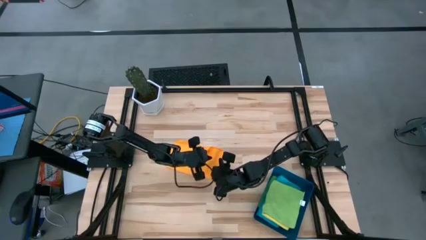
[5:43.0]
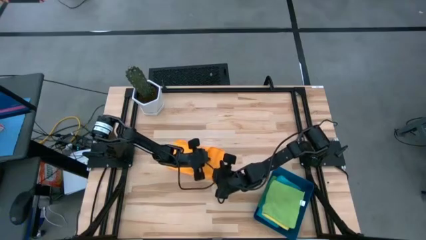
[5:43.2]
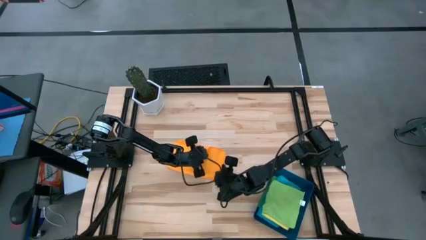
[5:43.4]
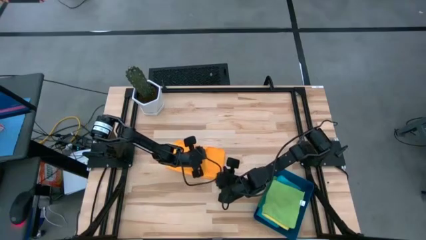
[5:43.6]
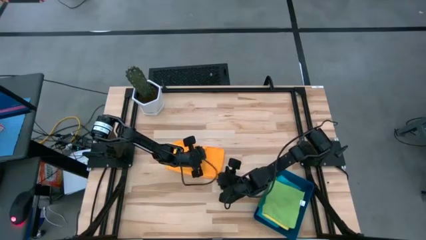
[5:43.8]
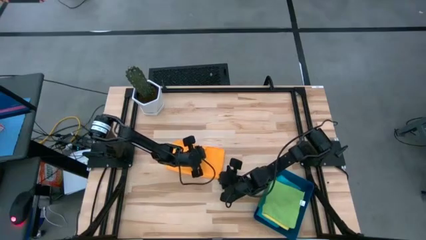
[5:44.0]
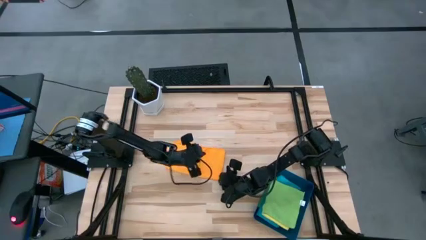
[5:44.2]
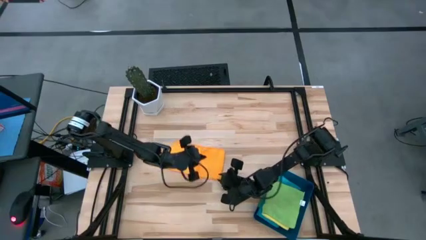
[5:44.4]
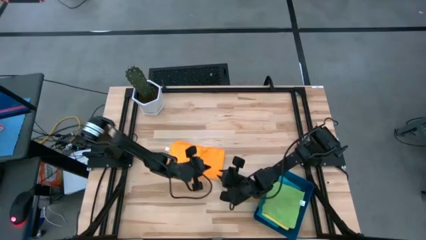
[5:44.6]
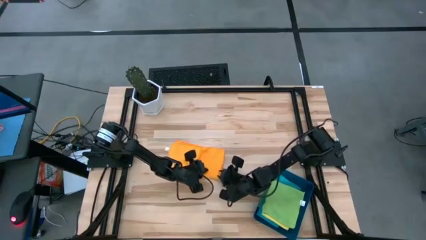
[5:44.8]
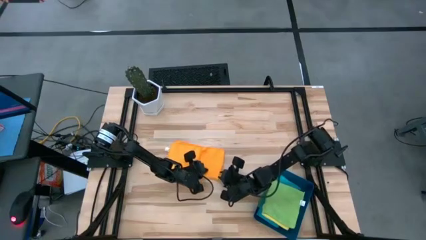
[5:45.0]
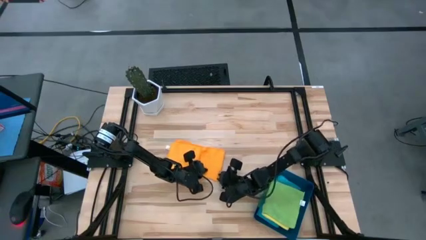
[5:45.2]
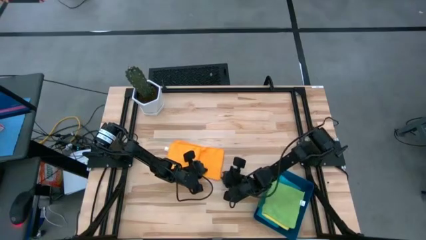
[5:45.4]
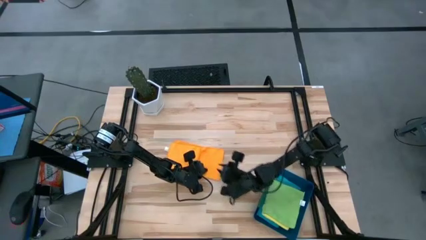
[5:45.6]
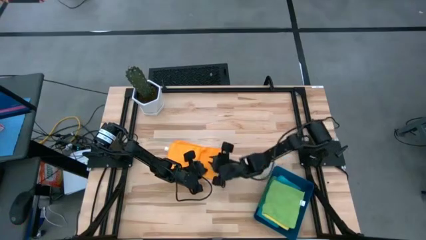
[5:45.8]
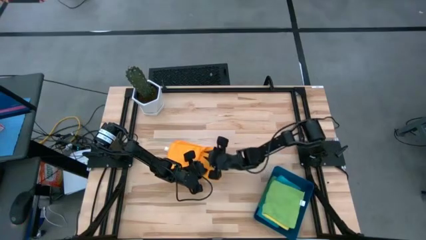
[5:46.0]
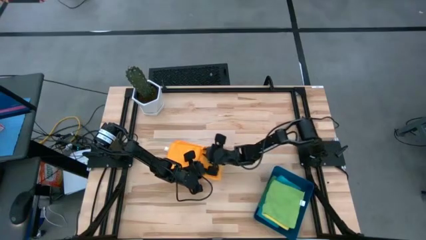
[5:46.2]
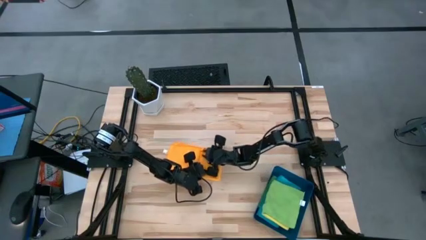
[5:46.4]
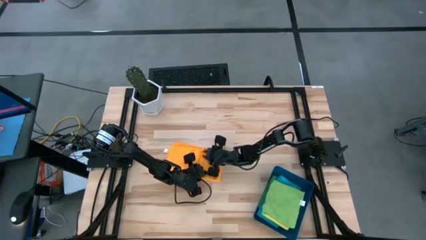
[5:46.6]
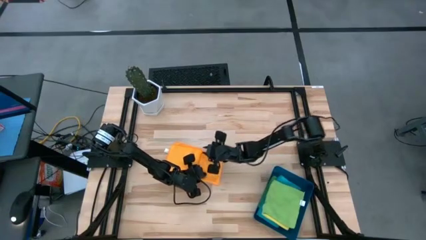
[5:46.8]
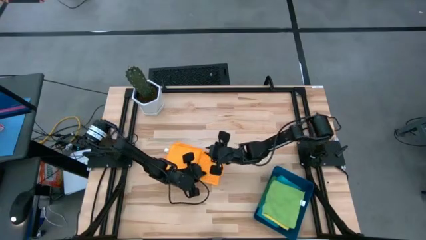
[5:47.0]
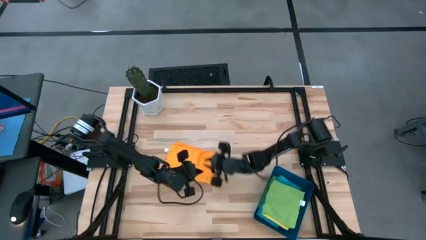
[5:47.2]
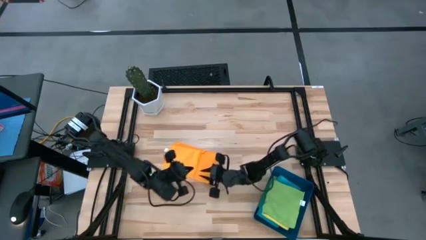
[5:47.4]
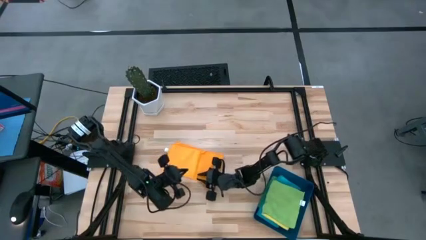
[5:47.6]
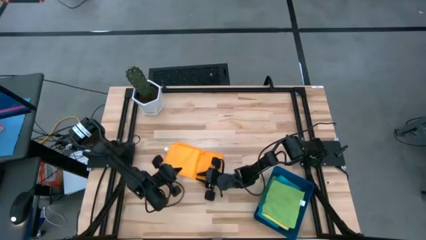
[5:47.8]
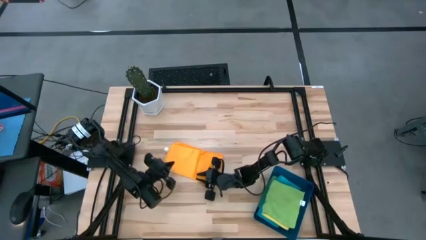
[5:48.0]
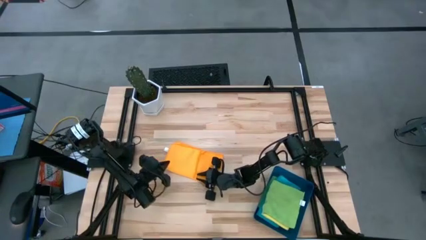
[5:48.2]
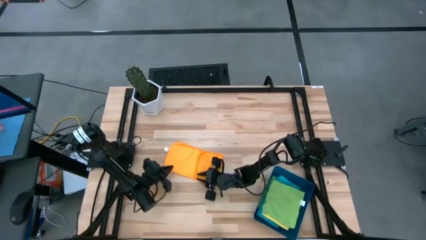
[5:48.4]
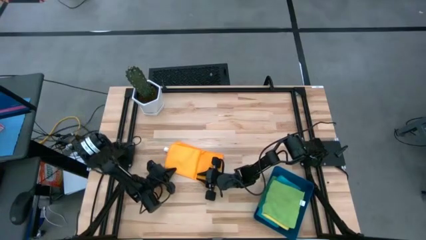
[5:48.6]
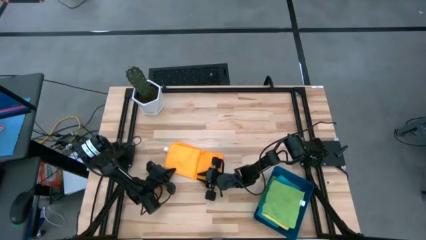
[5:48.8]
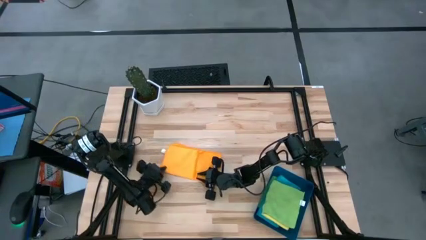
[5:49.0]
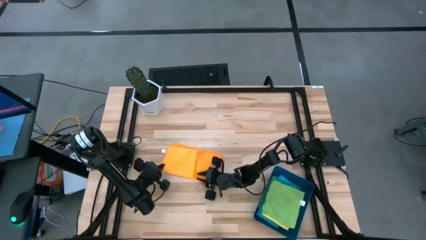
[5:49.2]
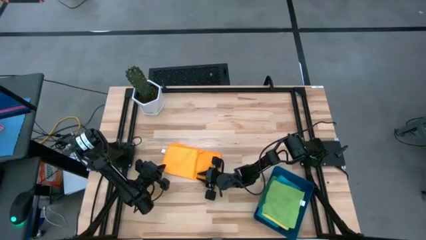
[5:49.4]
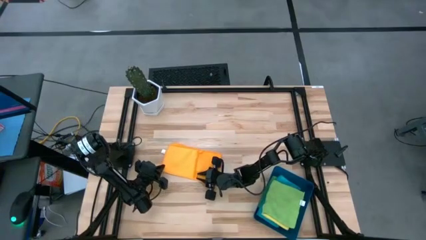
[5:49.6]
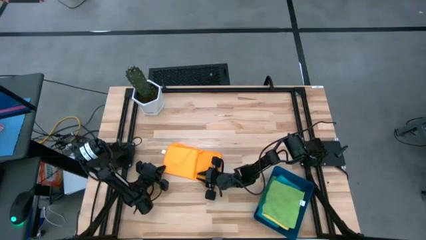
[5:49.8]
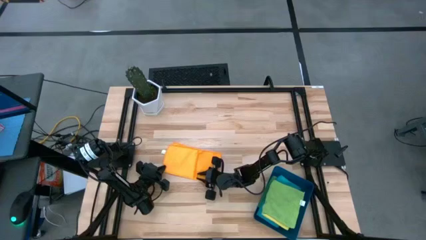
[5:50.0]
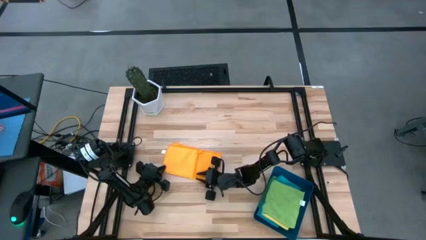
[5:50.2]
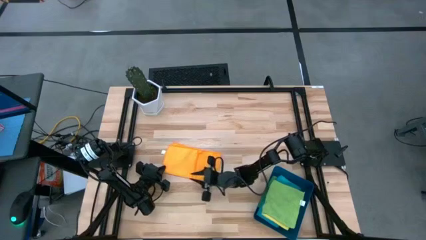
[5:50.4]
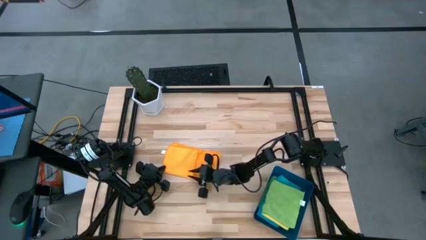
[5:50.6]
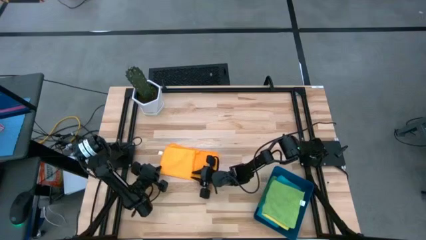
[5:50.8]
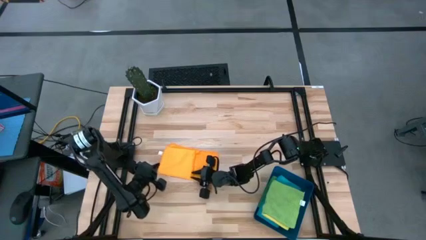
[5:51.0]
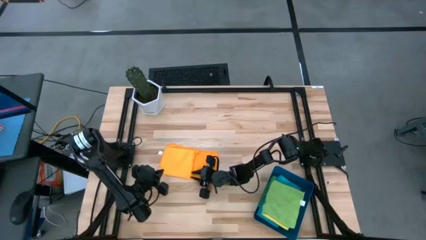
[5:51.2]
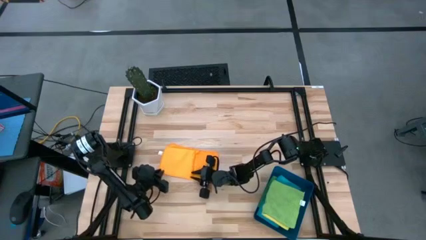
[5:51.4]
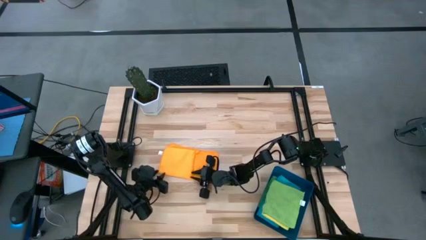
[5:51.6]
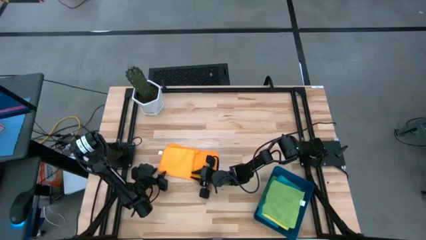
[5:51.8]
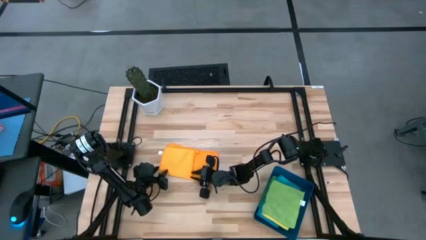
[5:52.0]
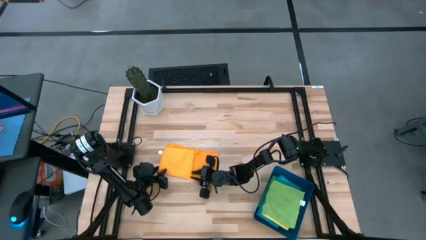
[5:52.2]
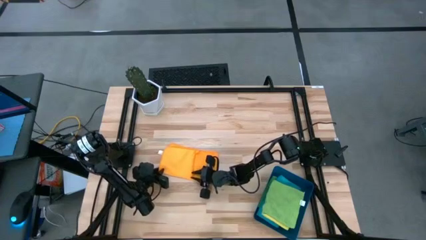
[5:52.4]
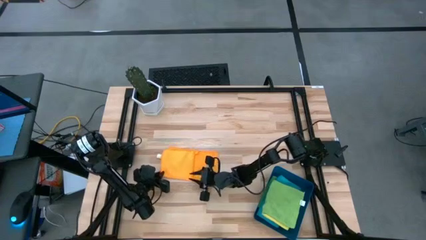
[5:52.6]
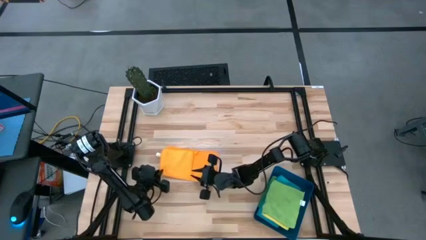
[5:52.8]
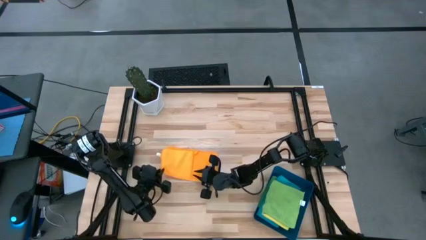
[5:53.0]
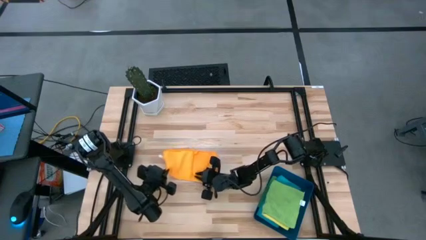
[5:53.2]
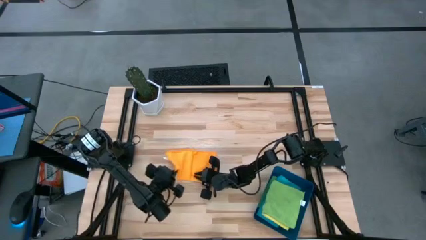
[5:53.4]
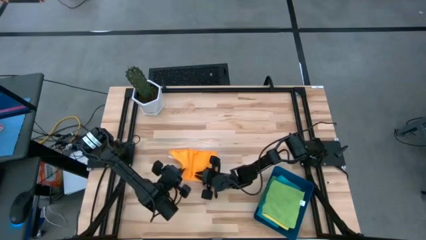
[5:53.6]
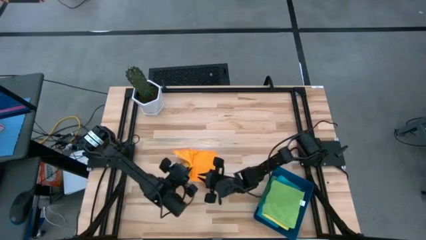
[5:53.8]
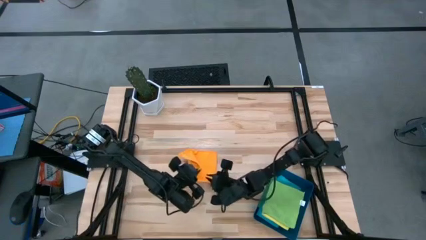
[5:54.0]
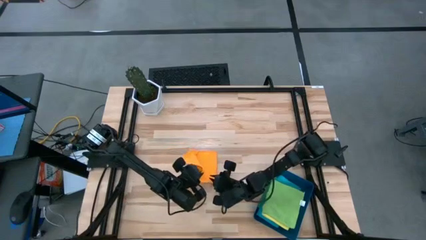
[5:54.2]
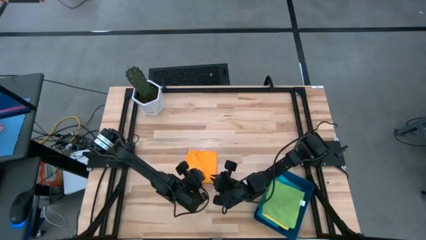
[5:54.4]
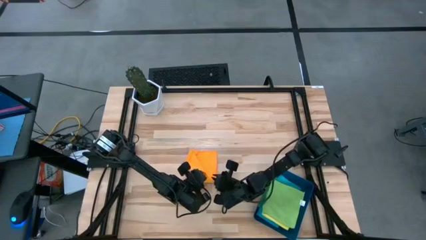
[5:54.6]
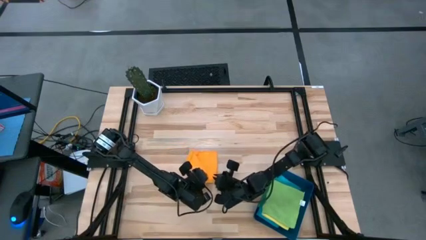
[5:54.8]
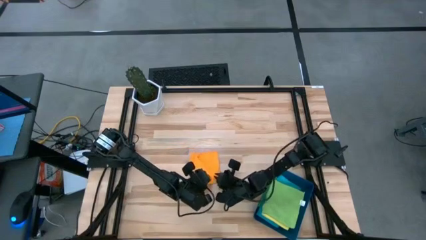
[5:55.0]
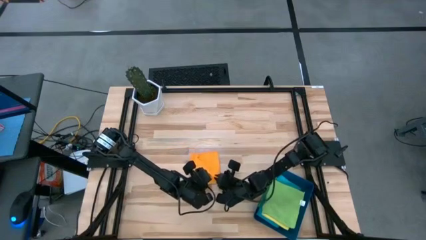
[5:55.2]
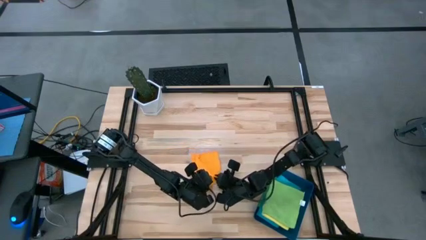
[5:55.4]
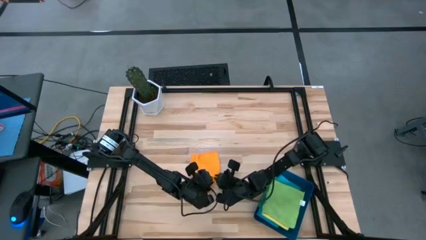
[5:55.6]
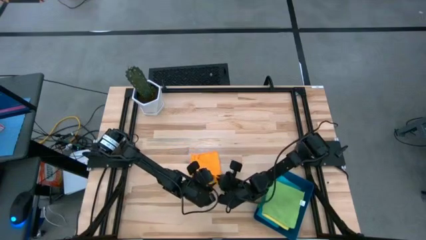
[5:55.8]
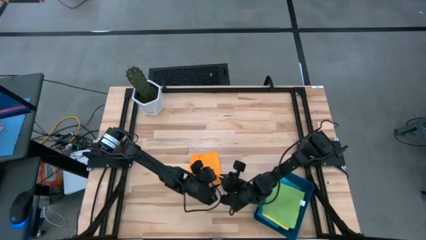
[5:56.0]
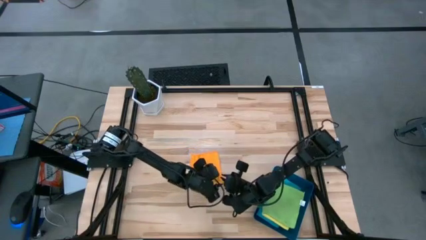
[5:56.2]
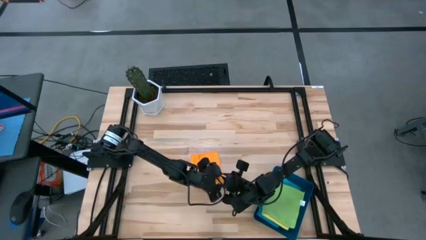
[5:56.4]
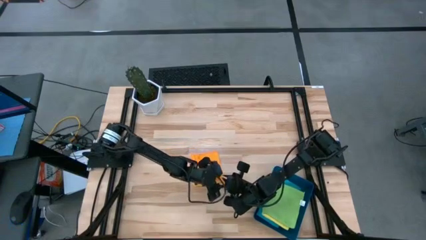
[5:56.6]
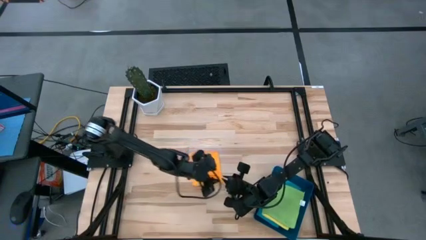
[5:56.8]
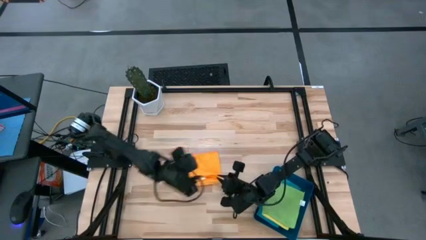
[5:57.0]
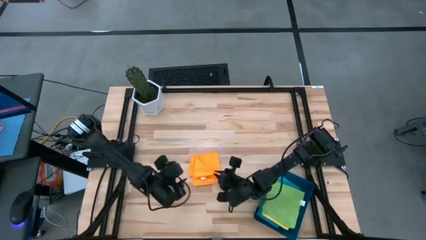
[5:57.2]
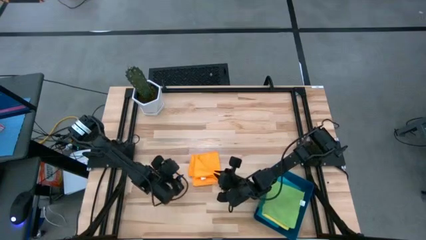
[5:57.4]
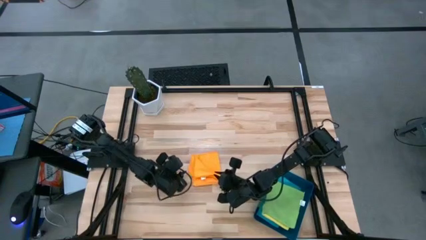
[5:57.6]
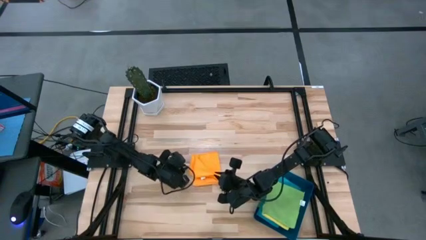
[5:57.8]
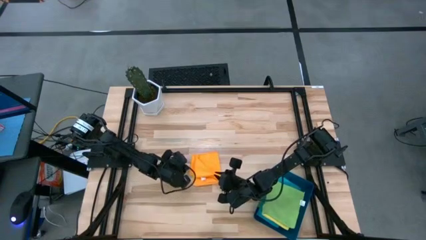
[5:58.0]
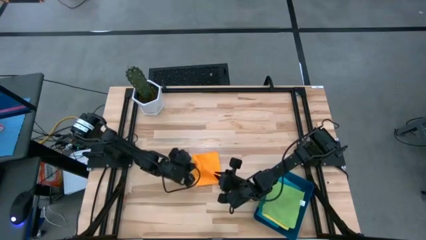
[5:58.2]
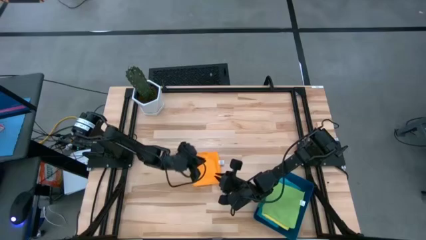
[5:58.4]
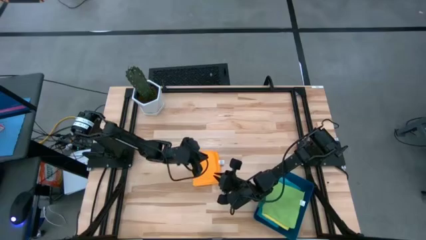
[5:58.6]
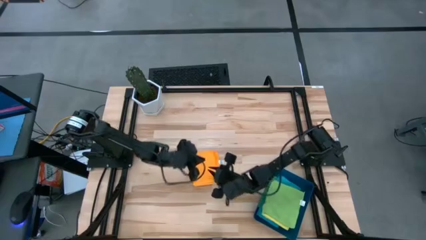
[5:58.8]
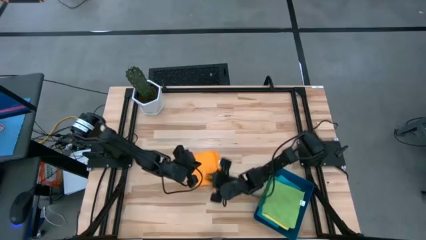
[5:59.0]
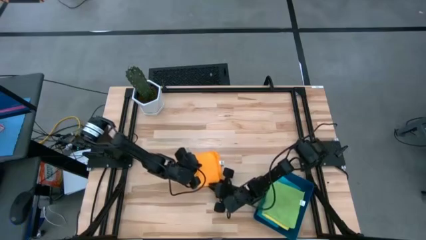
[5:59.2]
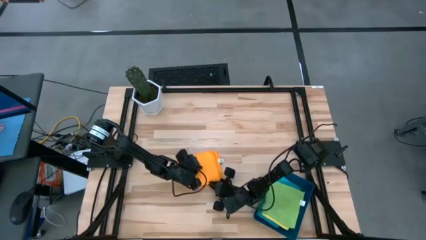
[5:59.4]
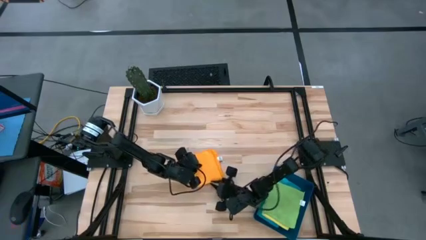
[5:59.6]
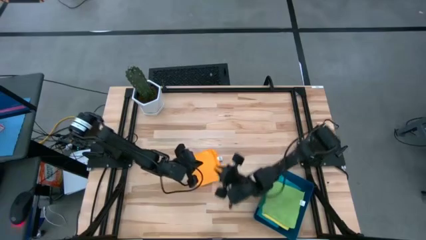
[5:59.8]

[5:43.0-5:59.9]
Task: Fold microfiber towels
Fold the orange microfiber towel
